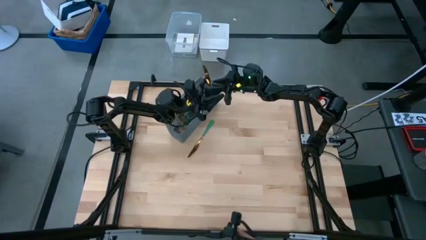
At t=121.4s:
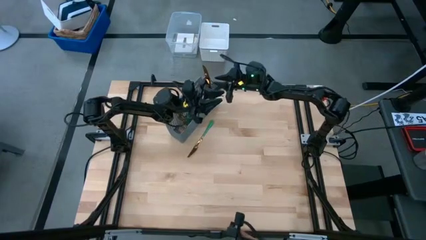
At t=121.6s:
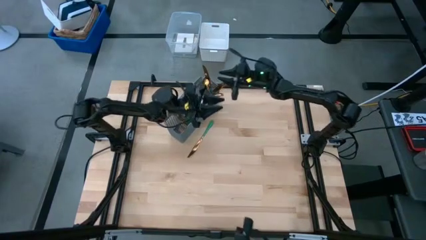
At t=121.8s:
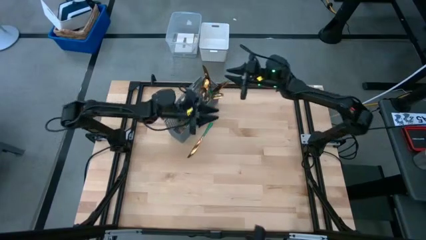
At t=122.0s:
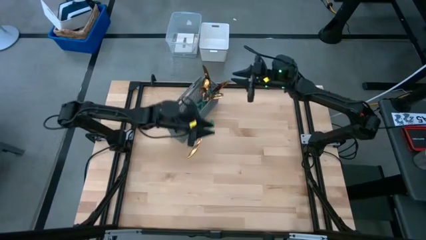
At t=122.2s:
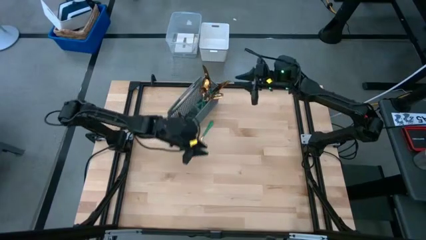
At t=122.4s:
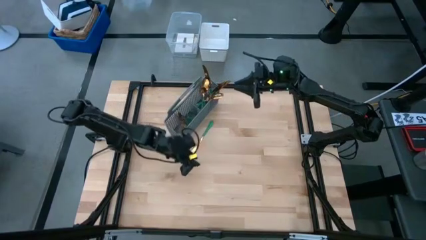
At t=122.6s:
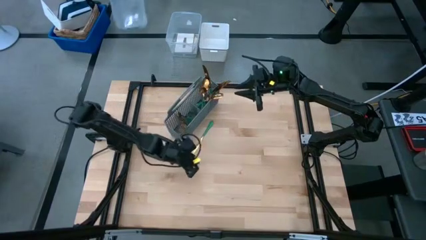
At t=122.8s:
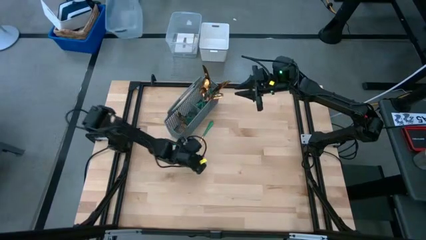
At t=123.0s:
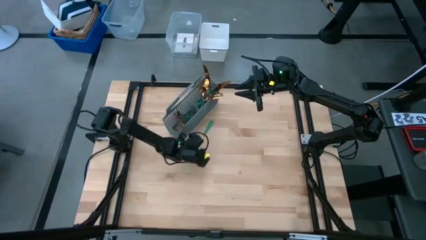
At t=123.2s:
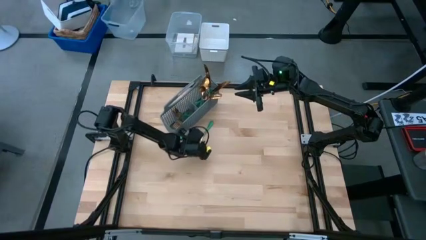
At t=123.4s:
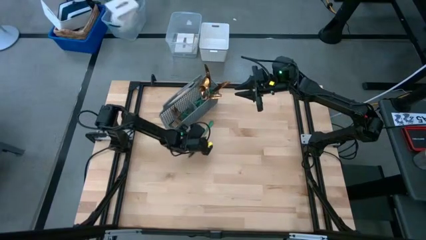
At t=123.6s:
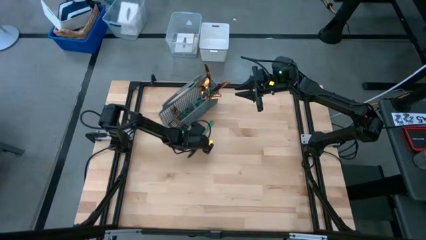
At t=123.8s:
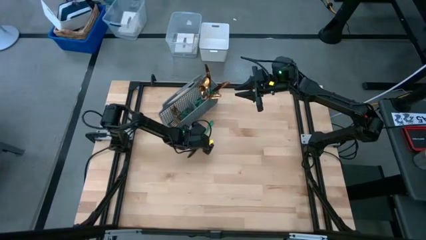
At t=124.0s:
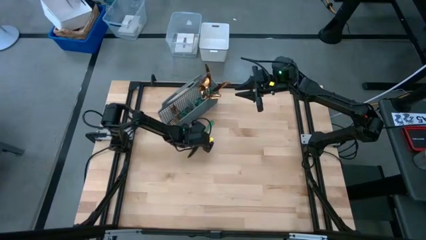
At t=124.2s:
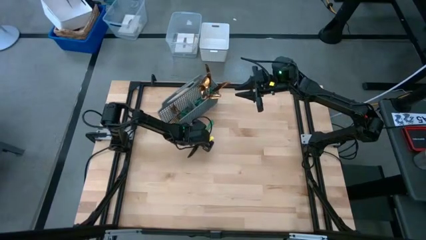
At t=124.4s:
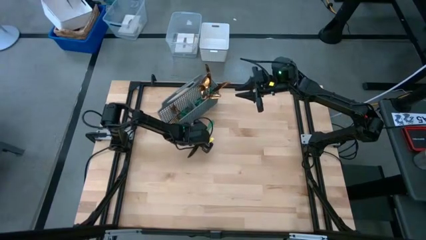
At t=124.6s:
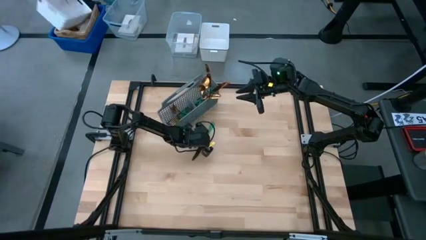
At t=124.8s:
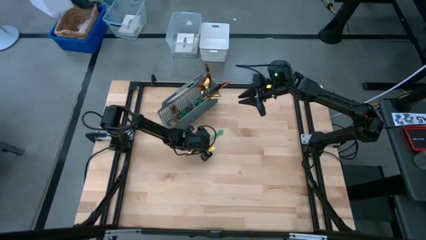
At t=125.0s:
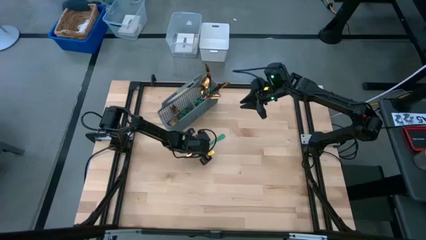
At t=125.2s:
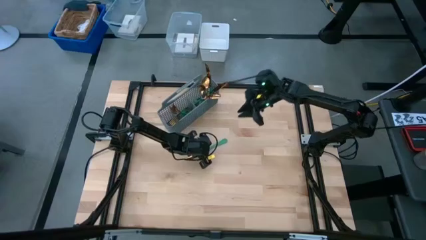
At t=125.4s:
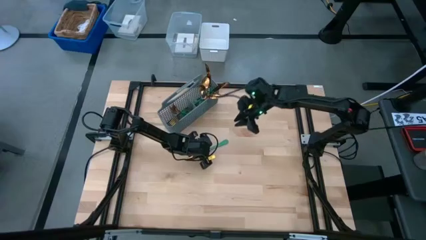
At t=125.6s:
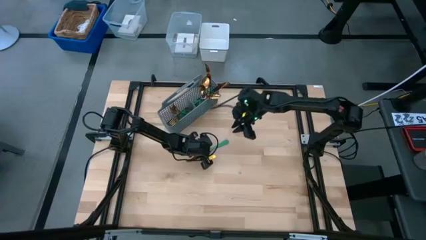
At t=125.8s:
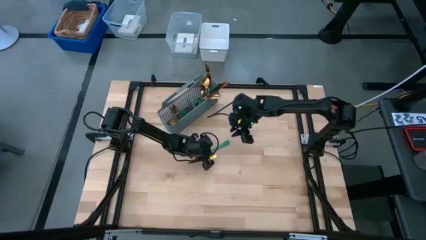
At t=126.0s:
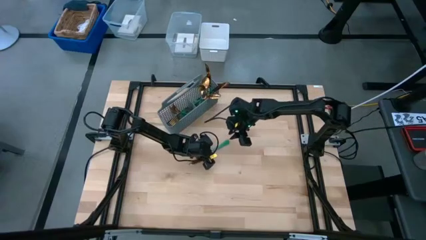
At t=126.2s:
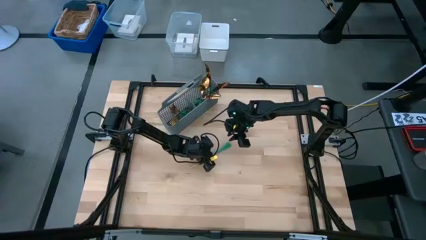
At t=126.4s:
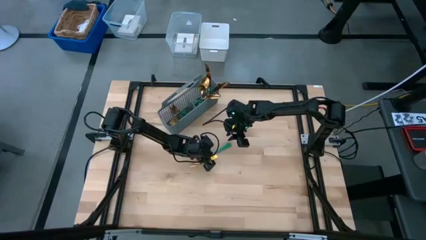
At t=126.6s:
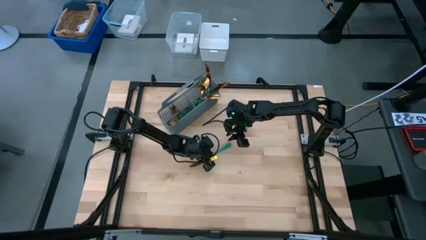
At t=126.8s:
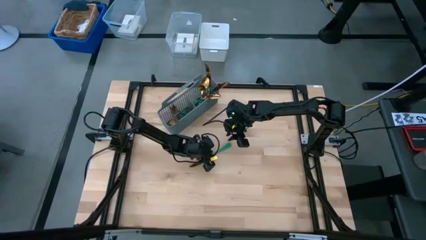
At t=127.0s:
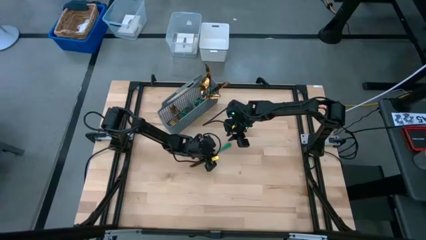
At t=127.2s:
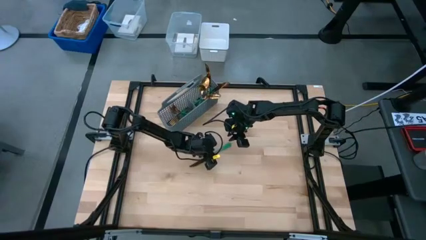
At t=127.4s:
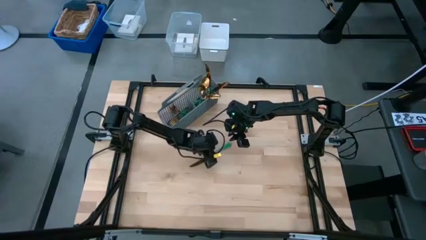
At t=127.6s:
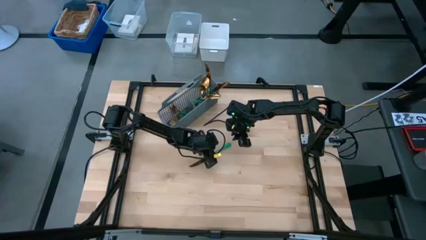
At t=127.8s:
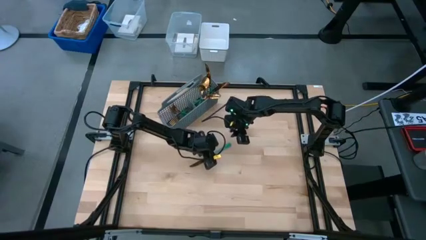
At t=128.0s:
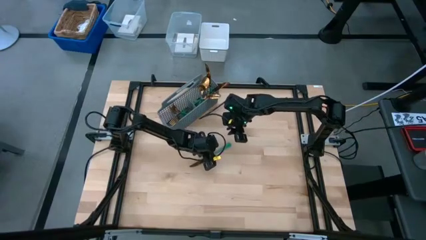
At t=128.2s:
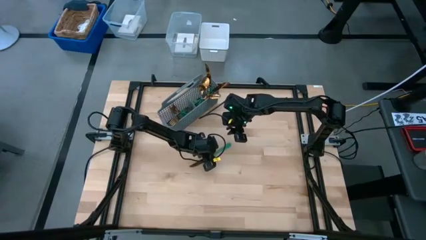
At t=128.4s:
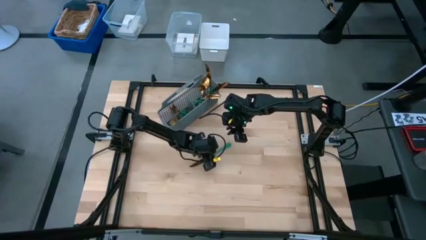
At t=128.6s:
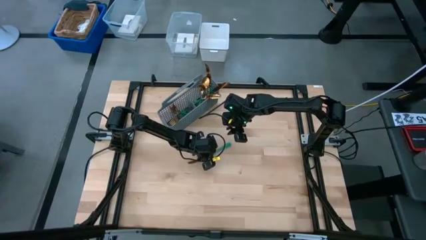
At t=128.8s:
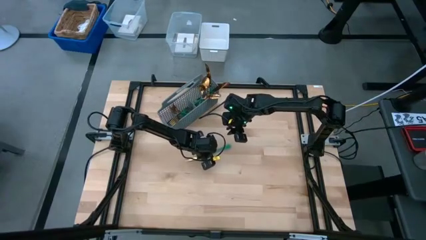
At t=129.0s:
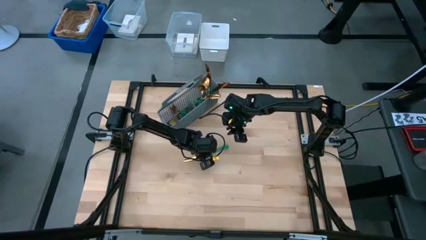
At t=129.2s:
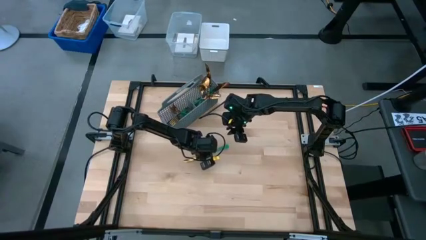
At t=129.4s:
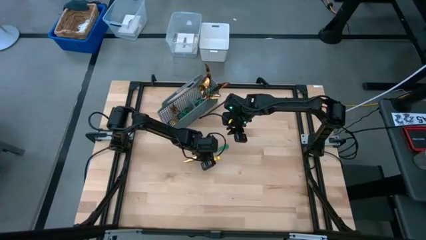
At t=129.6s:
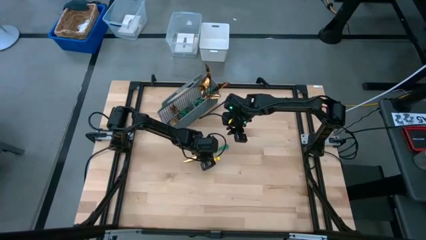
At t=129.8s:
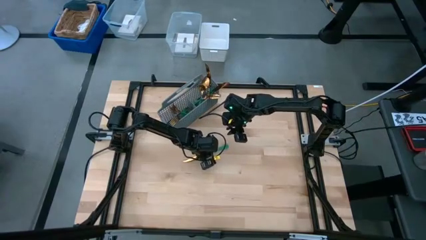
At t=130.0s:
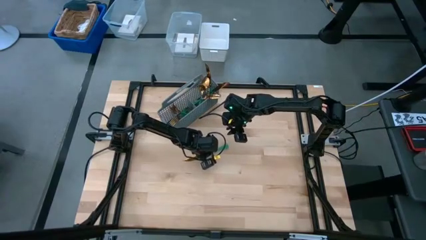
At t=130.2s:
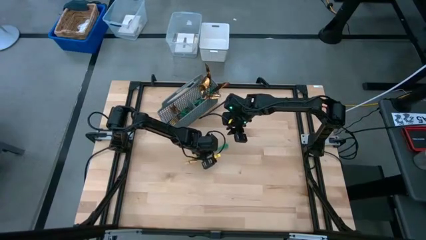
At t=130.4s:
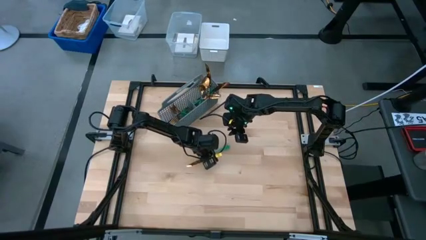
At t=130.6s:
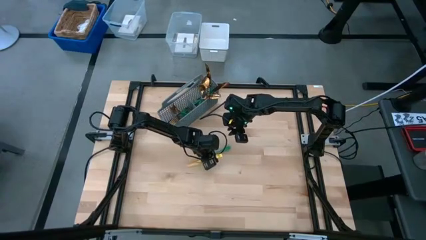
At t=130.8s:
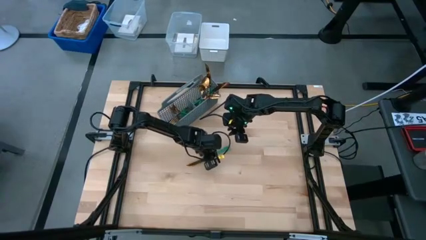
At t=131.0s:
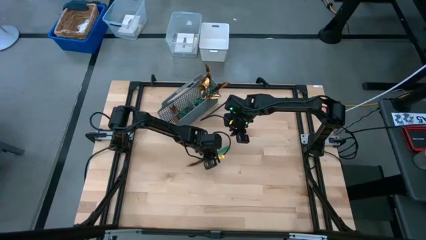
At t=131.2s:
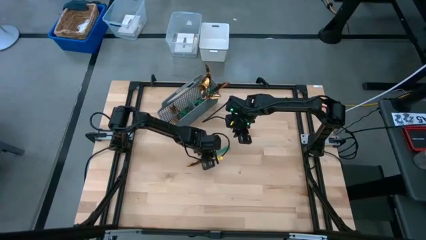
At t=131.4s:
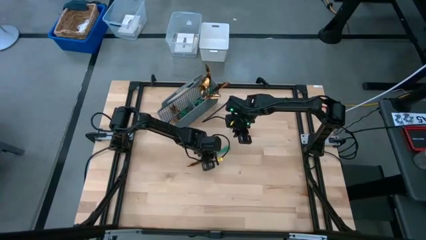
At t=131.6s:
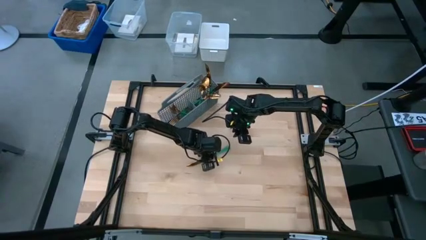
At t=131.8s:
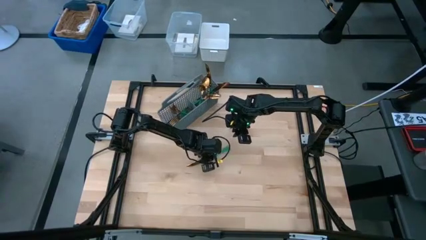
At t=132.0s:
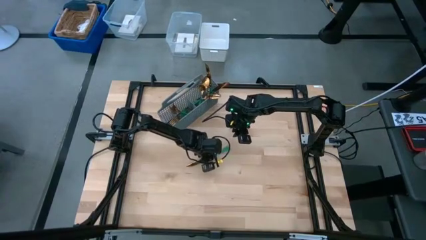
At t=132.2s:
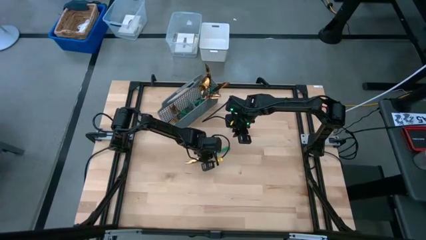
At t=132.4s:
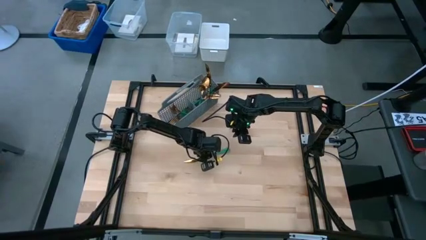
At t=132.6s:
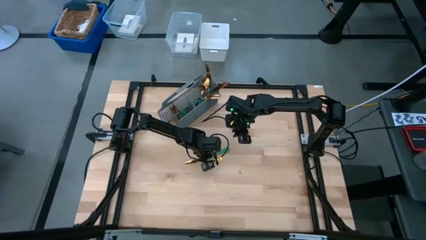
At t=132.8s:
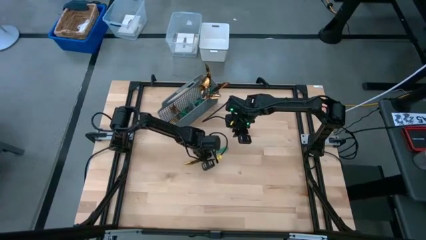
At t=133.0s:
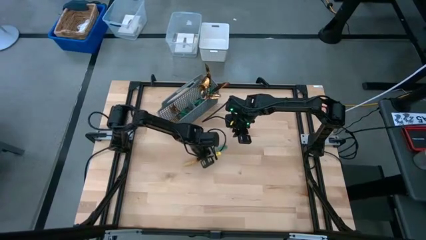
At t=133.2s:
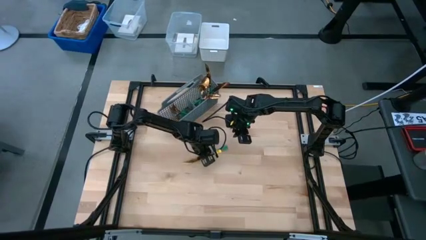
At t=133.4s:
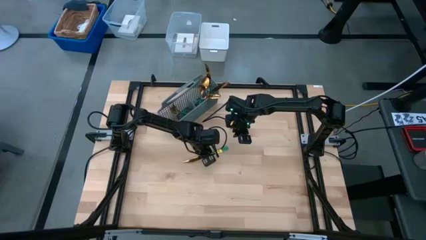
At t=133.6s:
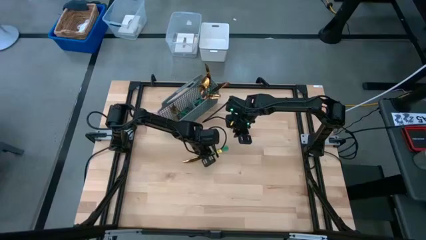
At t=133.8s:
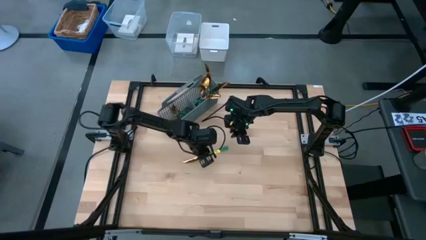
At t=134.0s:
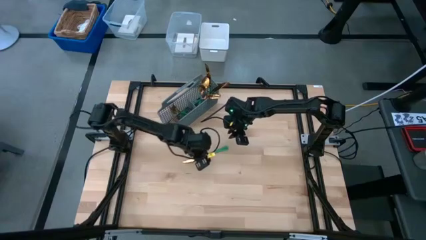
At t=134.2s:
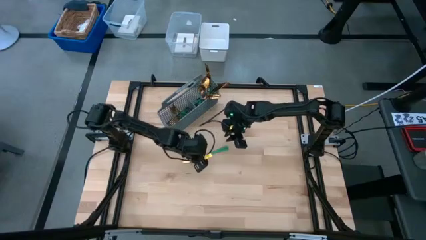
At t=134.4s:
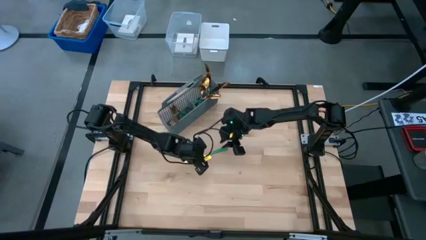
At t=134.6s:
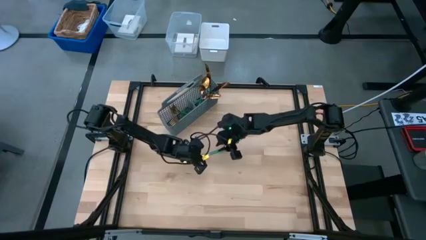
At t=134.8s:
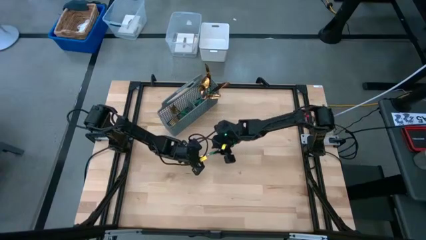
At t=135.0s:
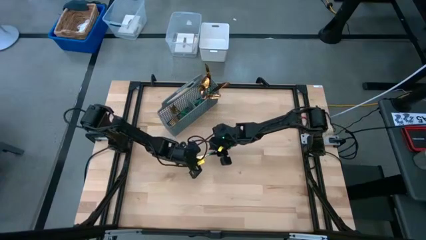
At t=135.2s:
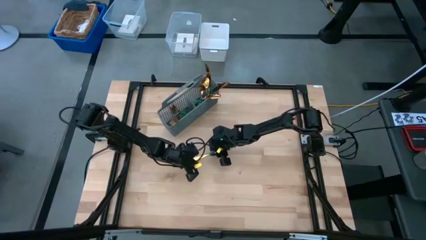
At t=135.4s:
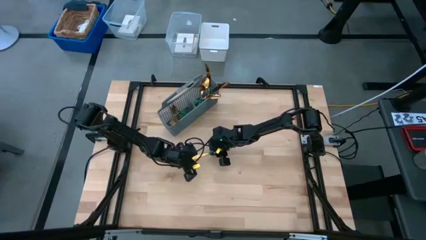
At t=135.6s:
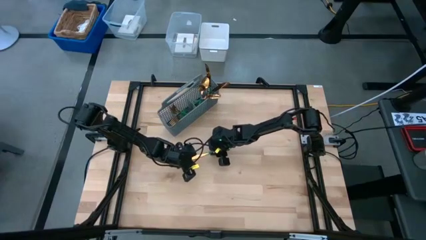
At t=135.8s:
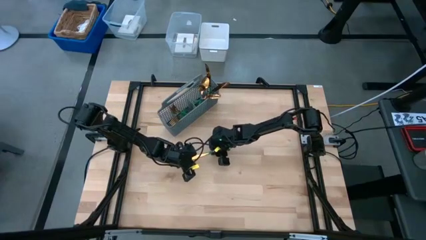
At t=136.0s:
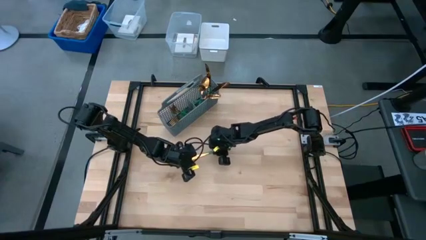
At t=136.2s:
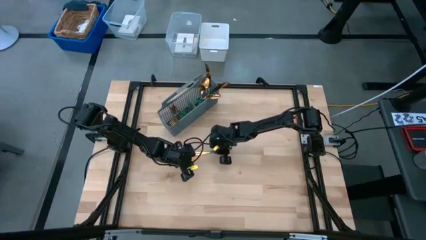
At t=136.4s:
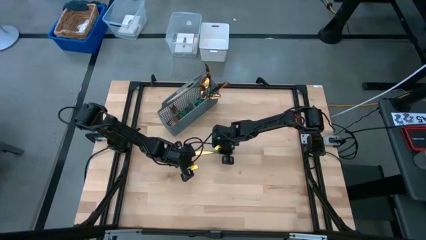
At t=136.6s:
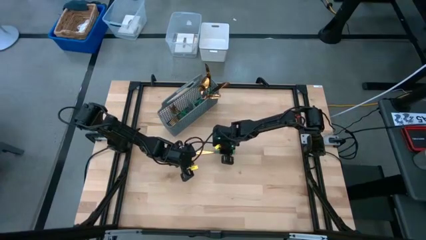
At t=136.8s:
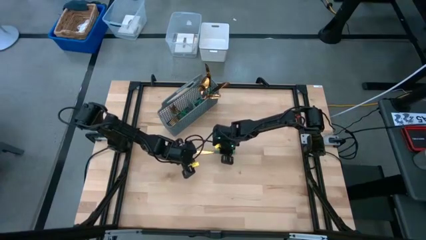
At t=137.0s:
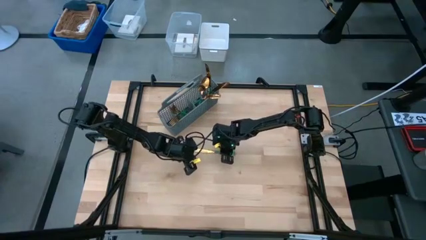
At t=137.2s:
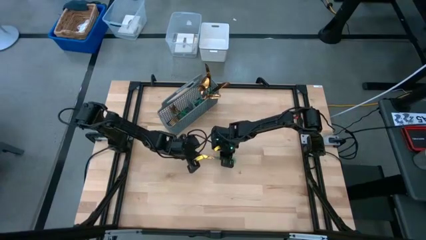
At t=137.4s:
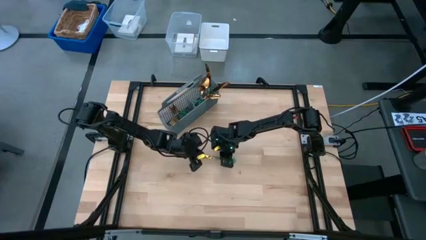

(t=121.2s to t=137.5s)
Task: Sort silverware
Put the green-gold table knife into the silverware basket
